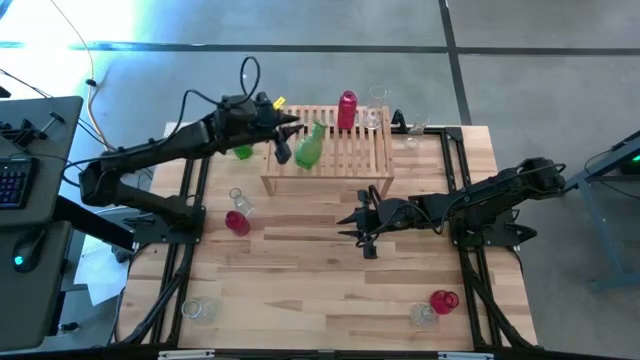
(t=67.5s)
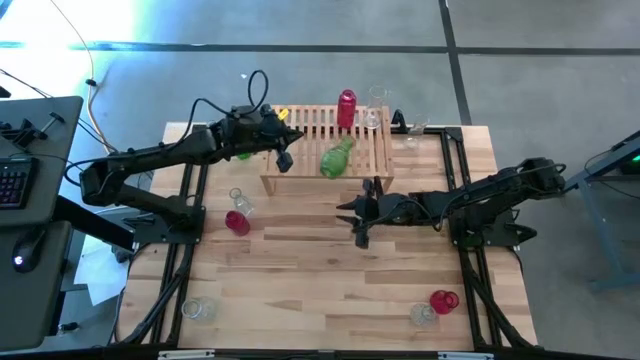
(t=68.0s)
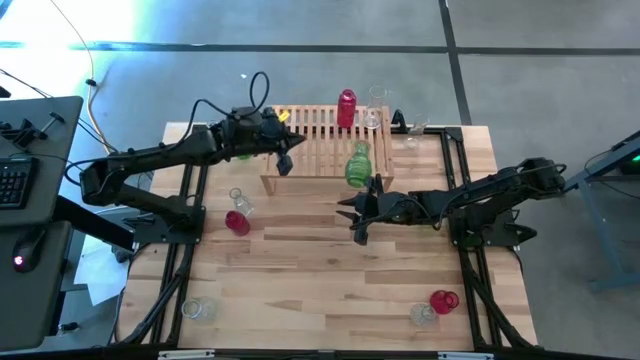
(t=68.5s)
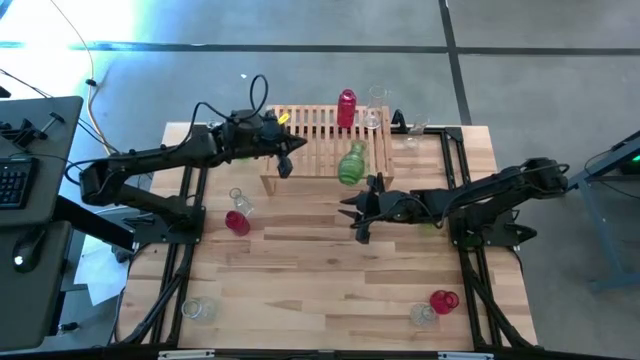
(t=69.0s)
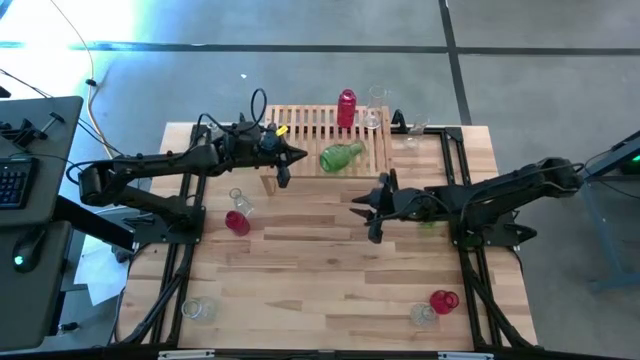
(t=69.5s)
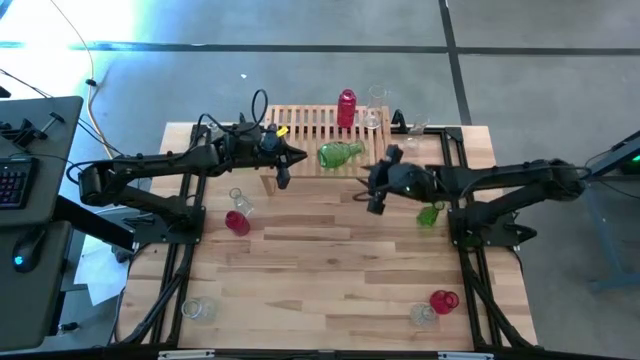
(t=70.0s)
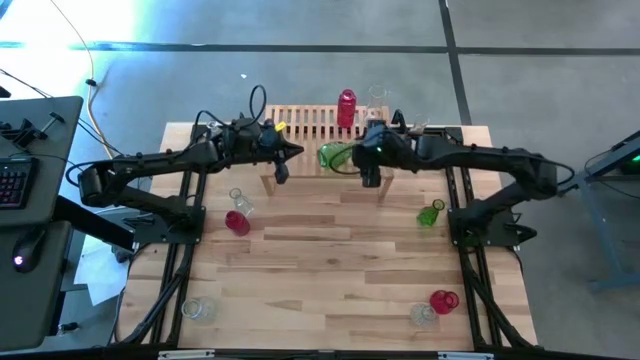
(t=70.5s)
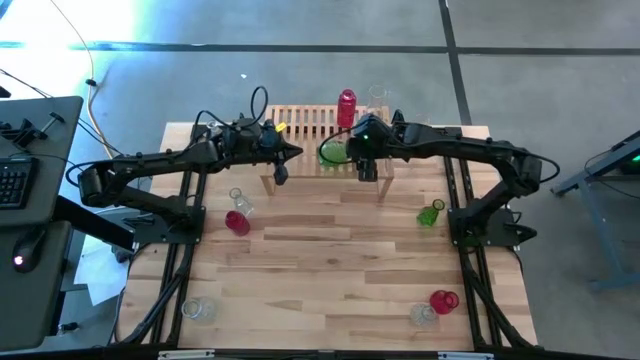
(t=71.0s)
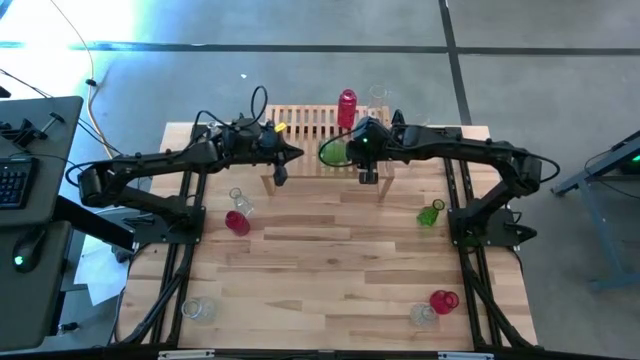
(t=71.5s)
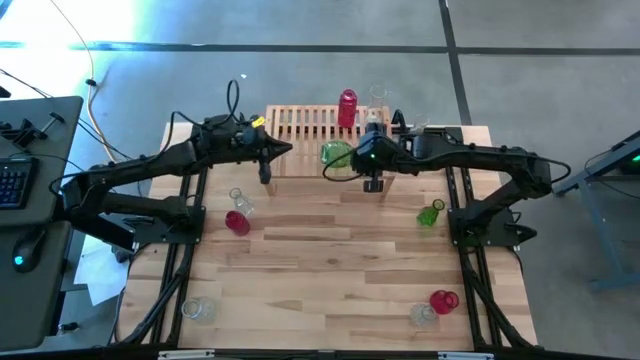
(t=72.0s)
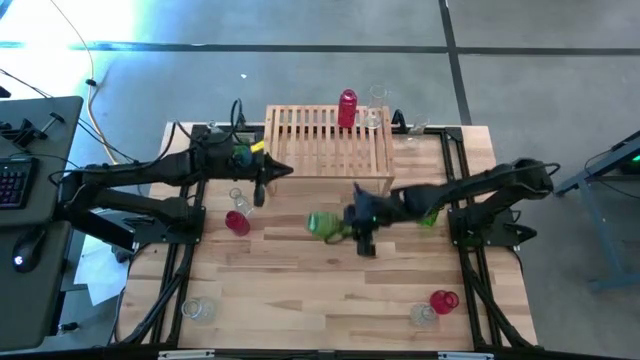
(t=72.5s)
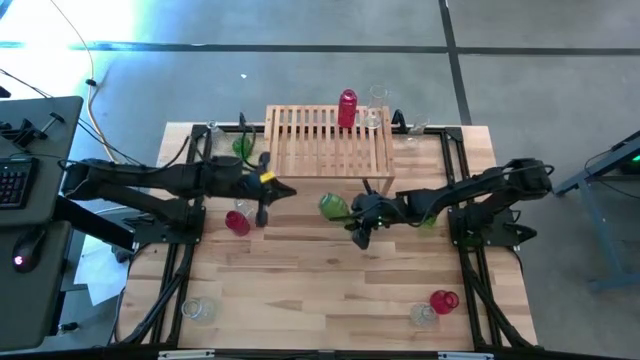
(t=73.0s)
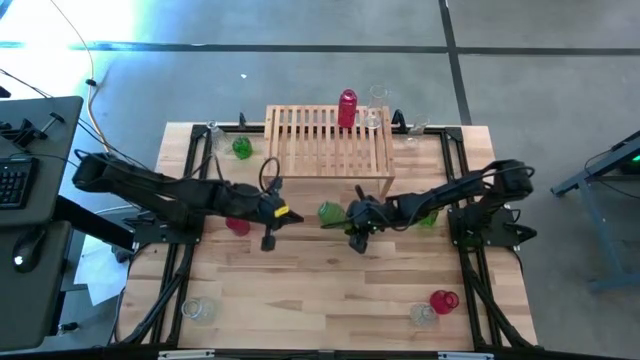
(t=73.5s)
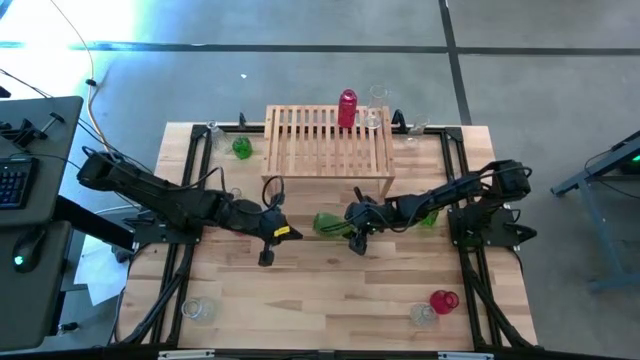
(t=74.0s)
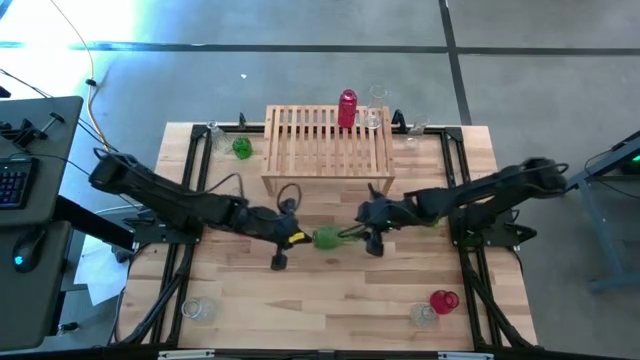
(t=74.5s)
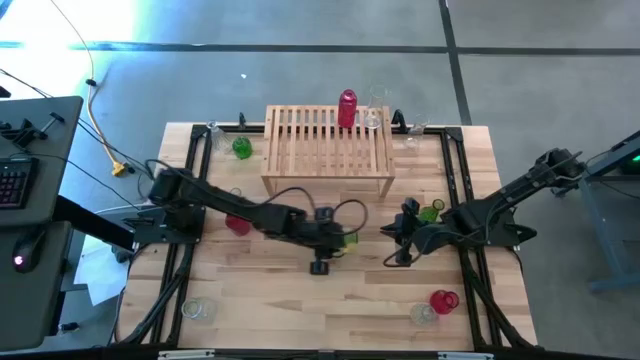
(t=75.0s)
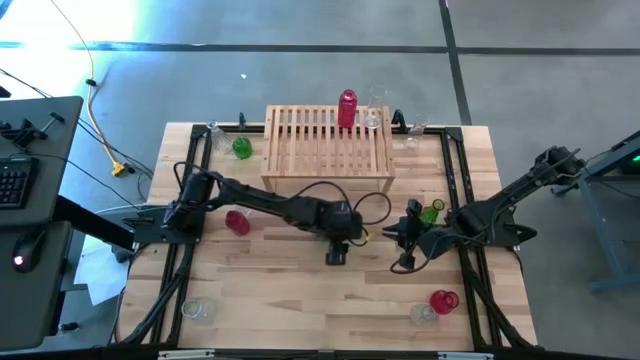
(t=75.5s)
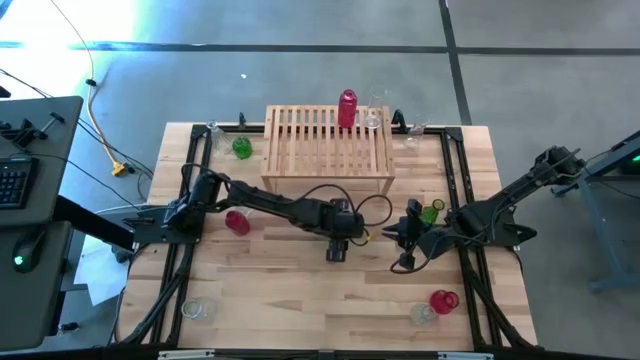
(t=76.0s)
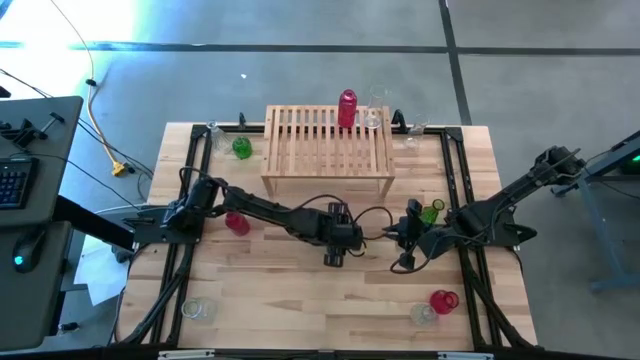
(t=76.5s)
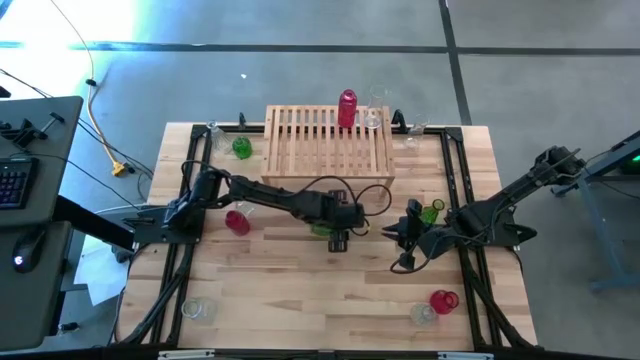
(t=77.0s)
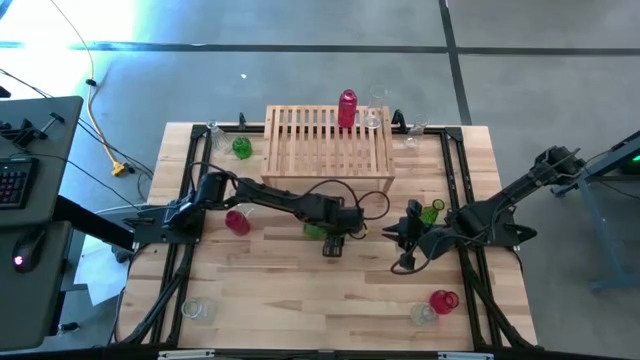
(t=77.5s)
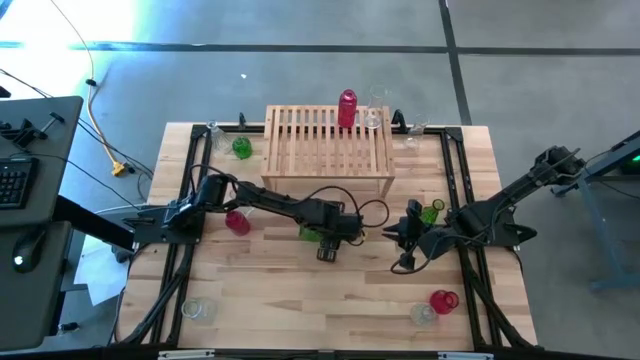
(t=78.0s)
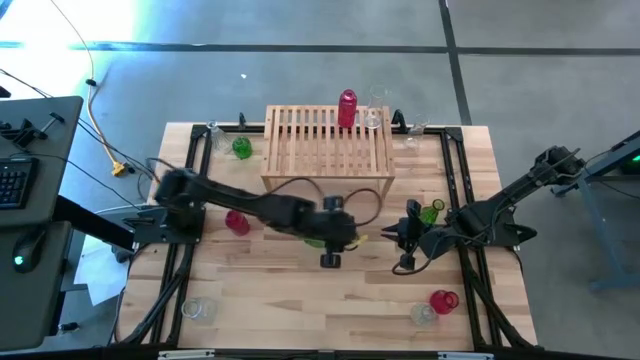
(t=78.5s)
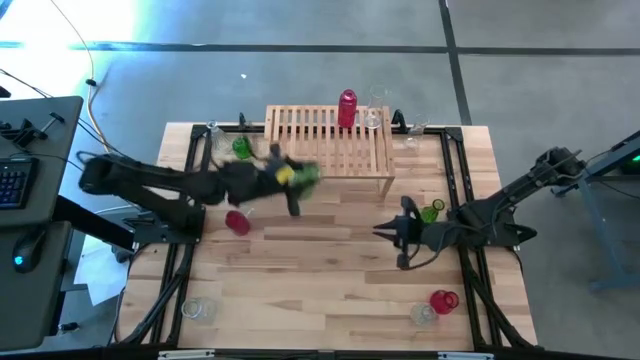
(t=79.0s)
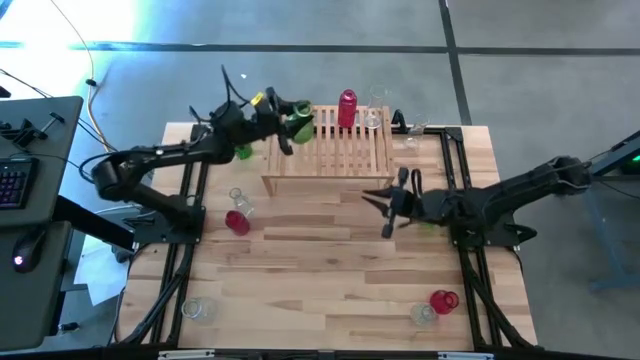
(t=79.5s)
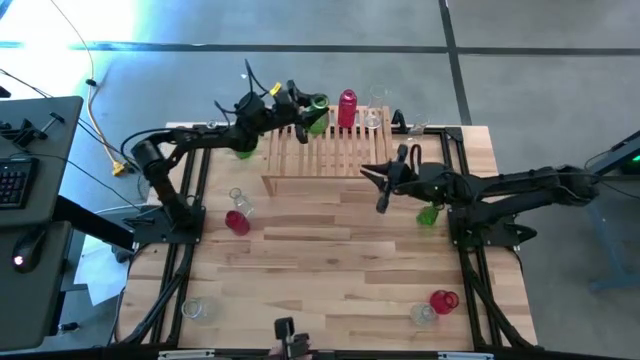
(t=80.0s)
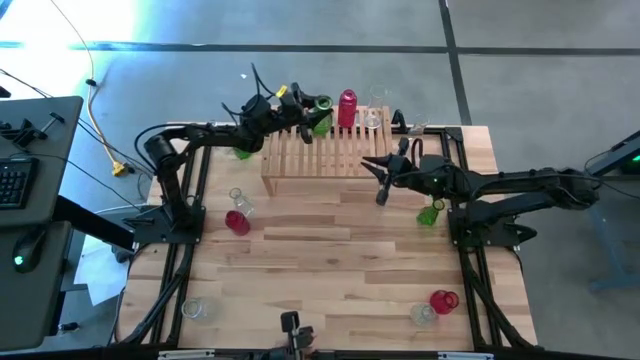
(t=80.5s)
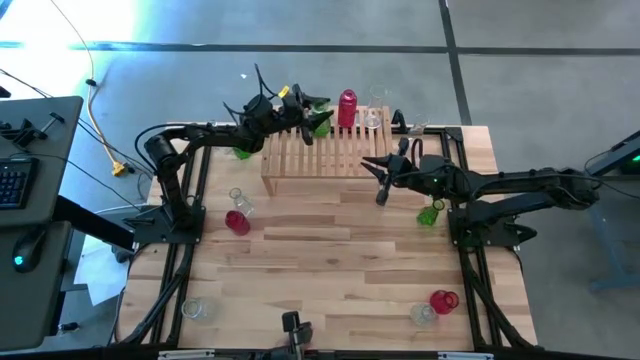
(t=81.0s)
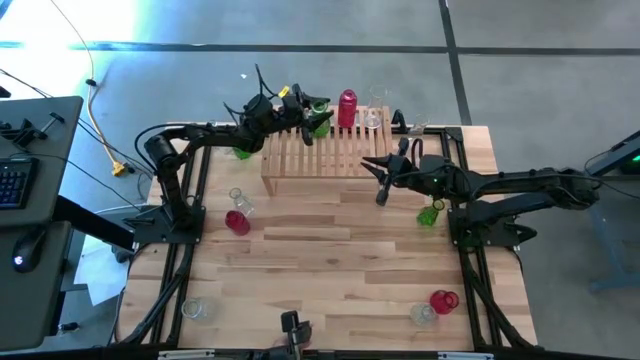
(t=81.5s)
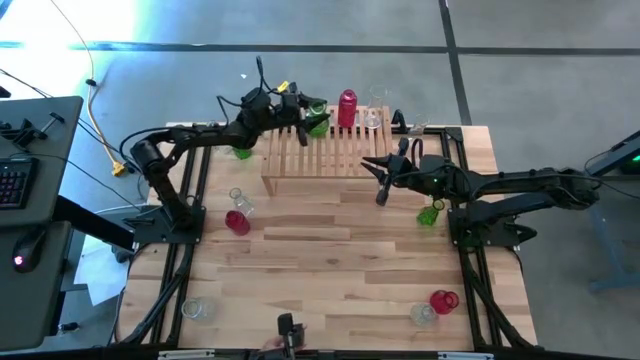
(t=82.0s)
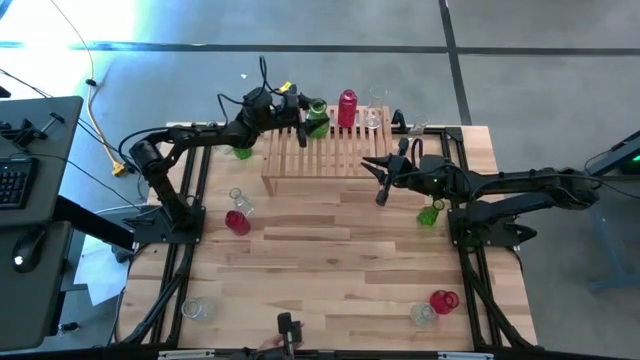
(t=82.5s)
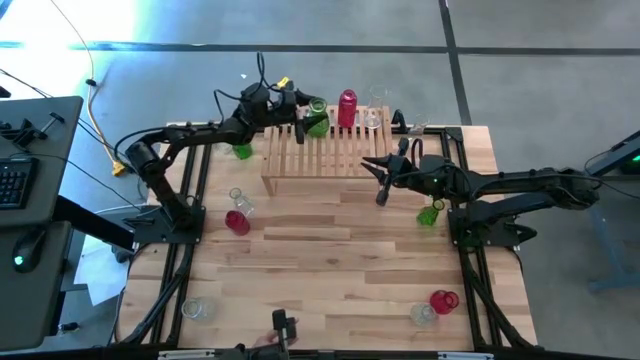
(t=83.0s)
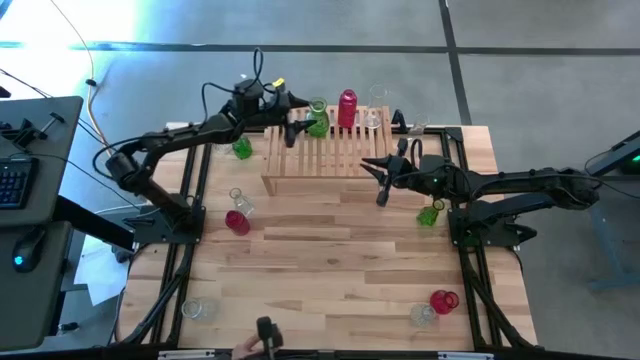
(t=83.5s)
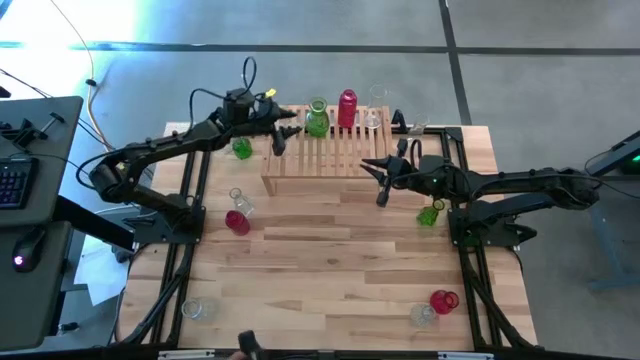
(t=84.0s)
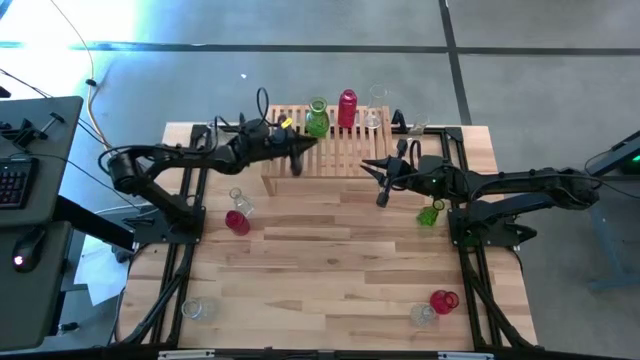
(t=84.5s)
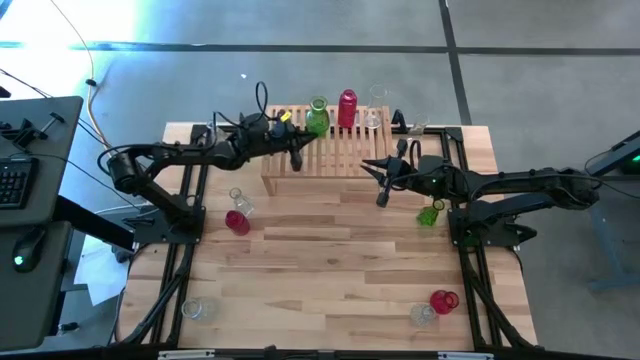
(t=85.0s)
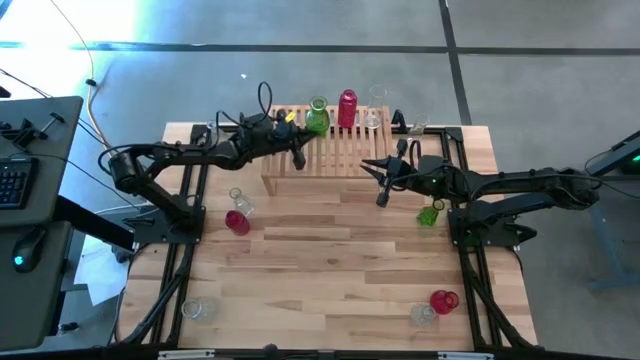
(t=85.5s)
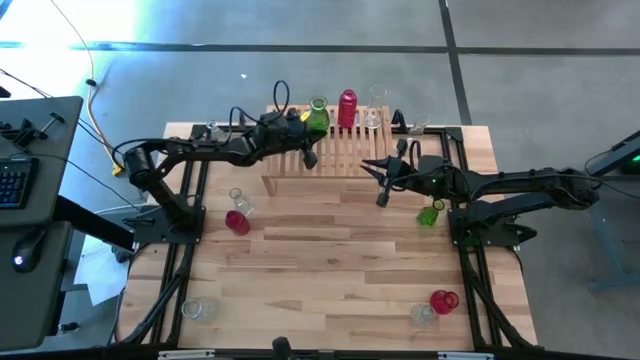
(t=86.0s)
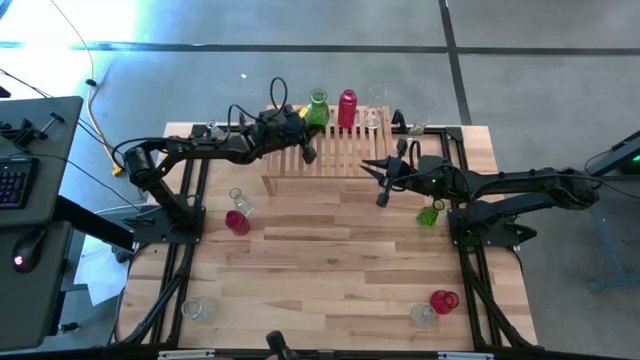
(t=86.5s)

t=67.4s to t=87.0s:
Task: sort vases onto shelf
Put the green vase on the shelf

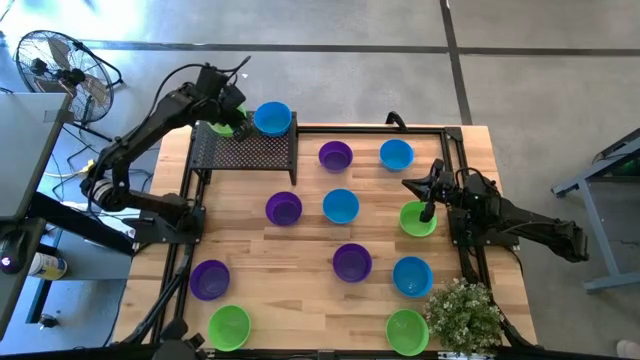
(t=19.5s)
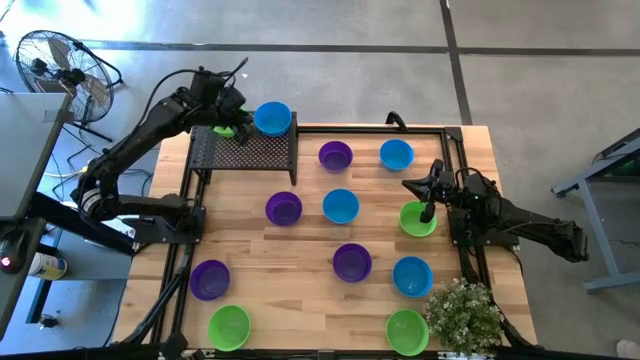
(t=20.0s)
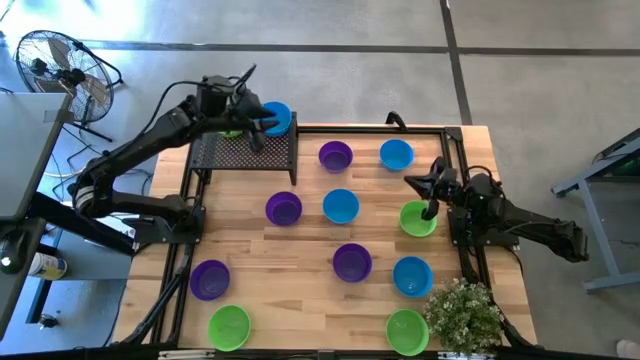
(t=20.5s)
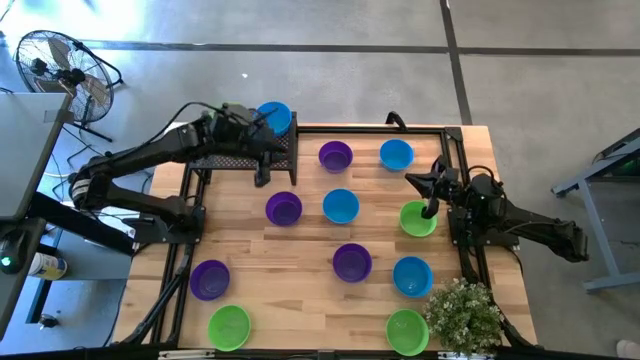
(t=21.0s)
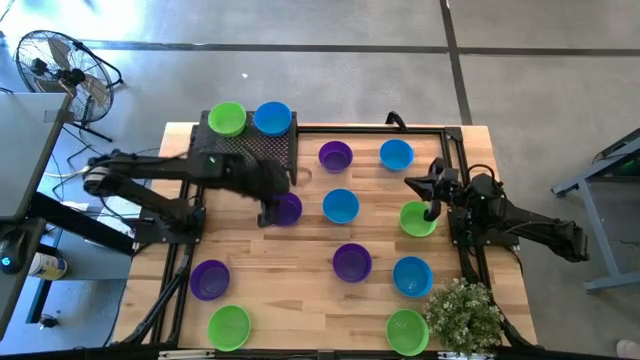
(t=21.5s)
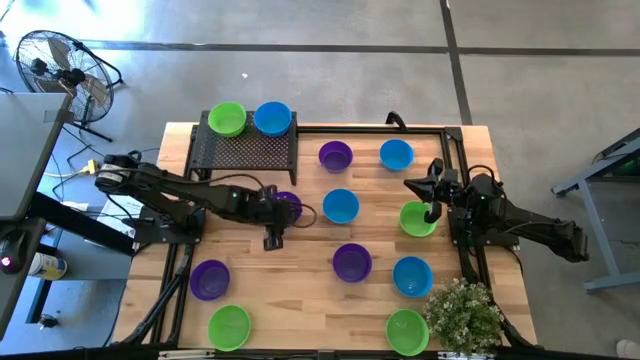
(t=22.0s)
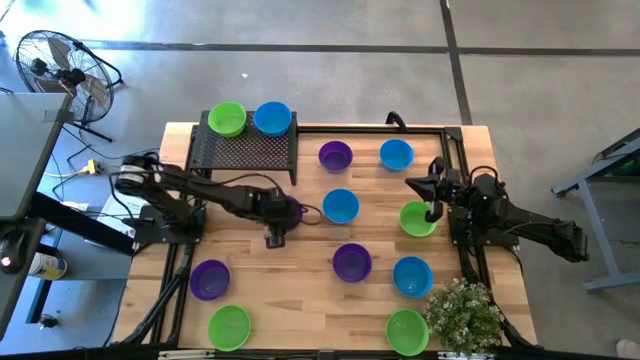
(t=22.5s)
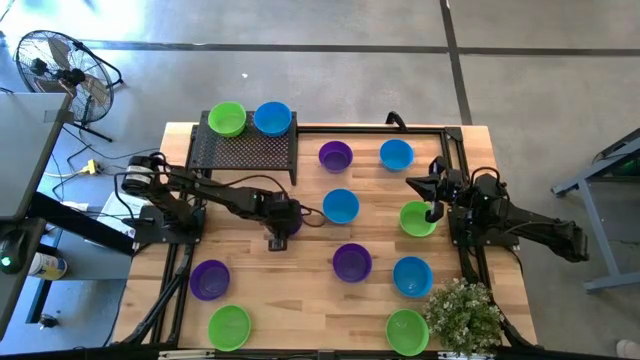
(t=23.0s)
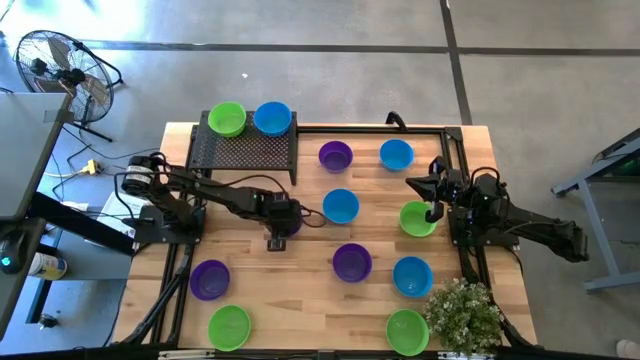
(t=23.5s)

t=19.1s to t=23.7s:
Task: Pick & Place Mini bowls
Put the violet bowl on the shelf
